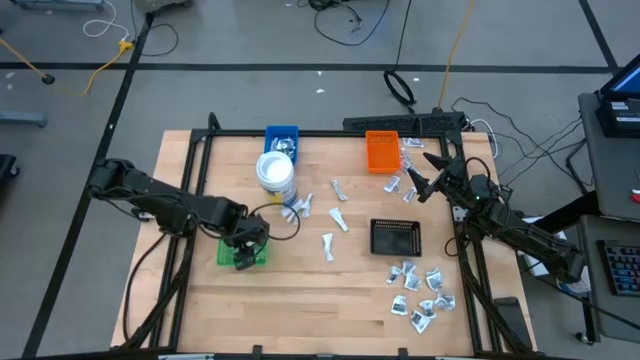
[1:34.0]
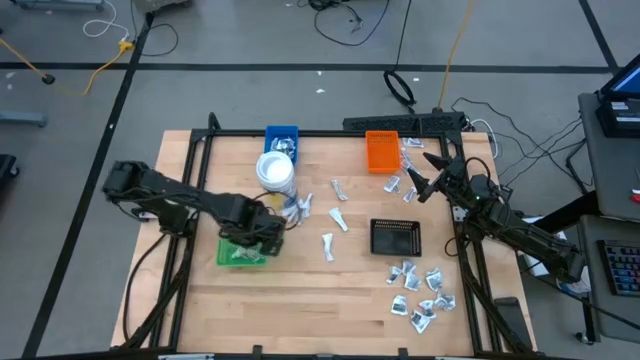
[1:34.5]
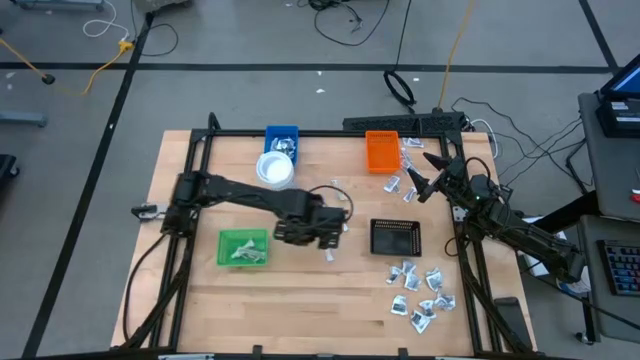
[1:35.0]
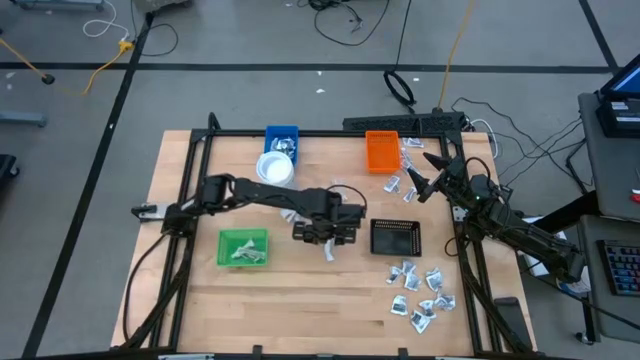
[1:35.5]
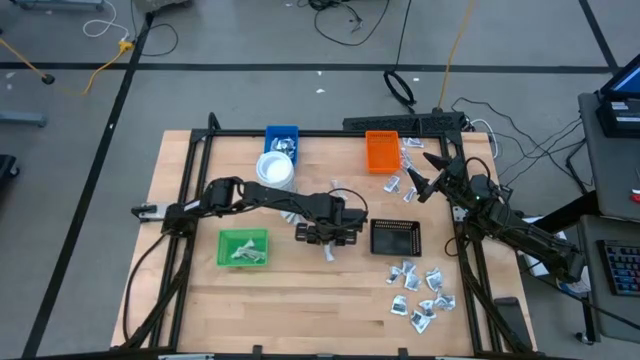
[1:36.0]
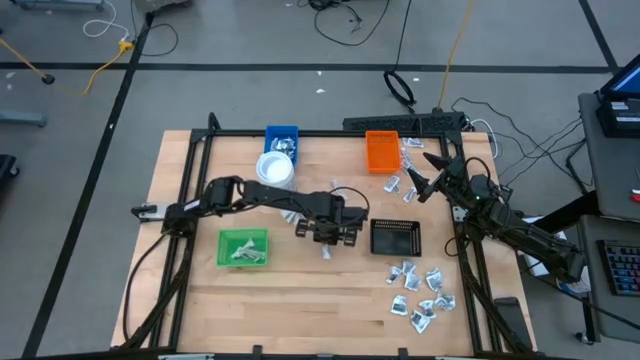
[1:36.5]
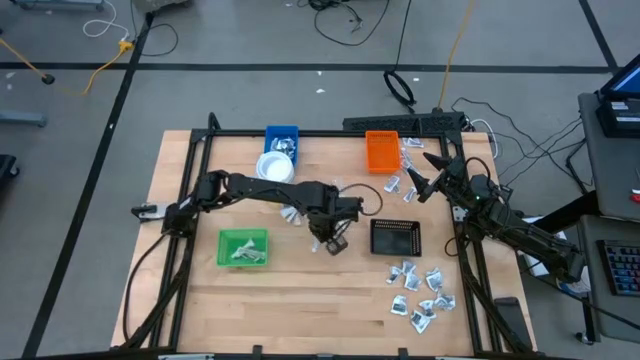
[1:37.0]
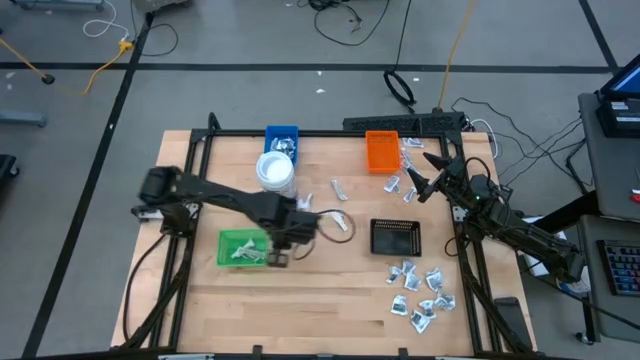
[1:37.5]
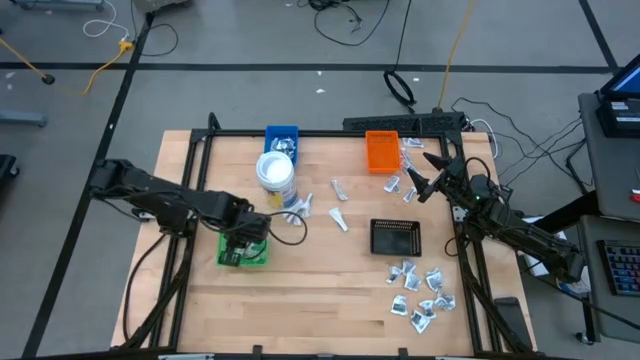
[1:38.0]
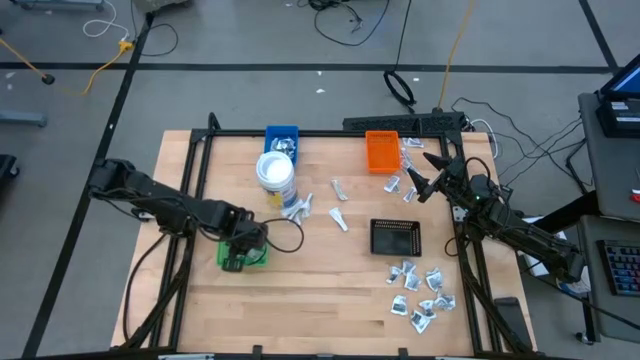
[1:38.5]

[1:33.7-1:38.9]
Task: Pick & Place First Aid Supplies
Put the green bandage pack into the green bin

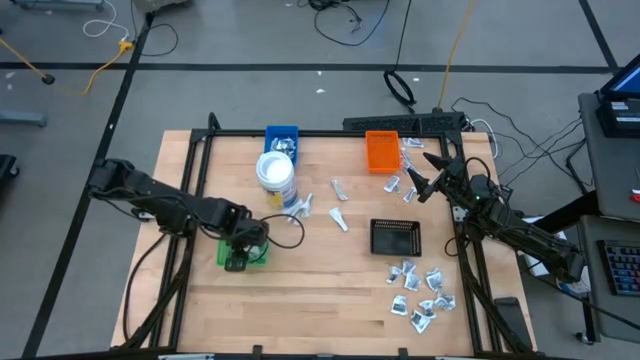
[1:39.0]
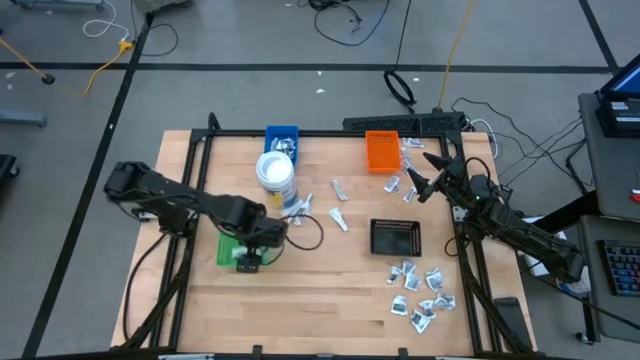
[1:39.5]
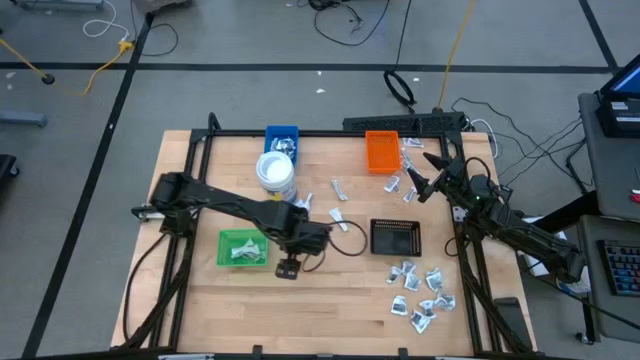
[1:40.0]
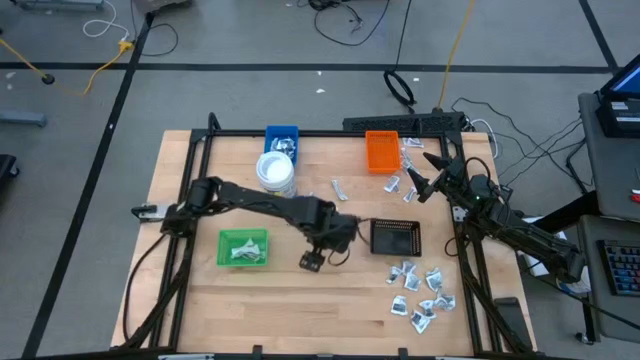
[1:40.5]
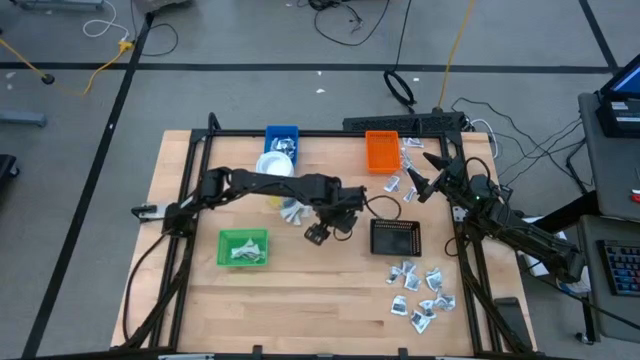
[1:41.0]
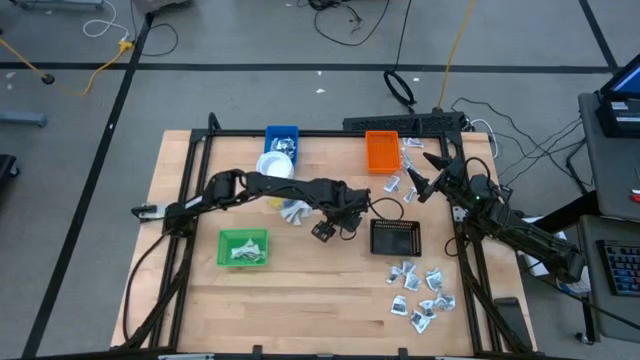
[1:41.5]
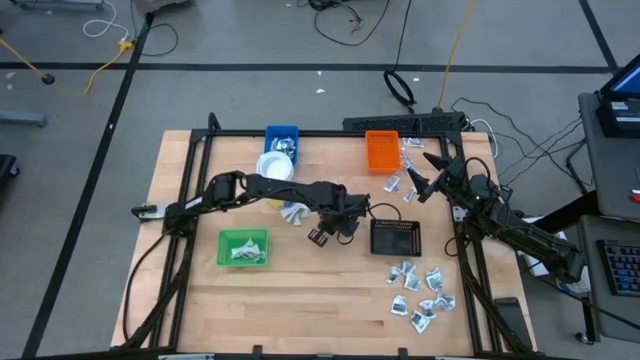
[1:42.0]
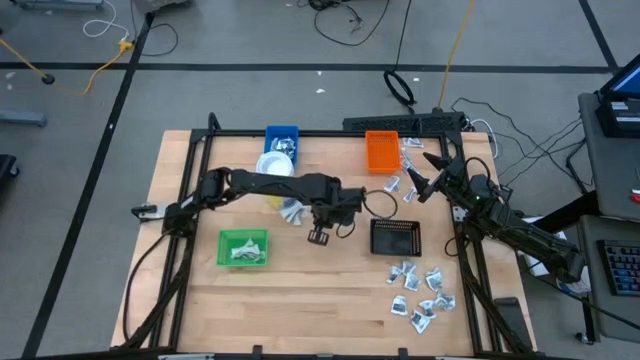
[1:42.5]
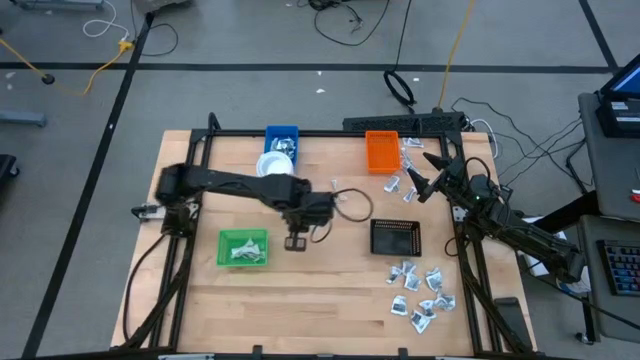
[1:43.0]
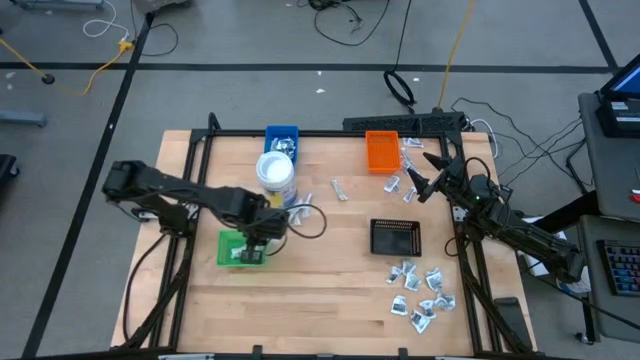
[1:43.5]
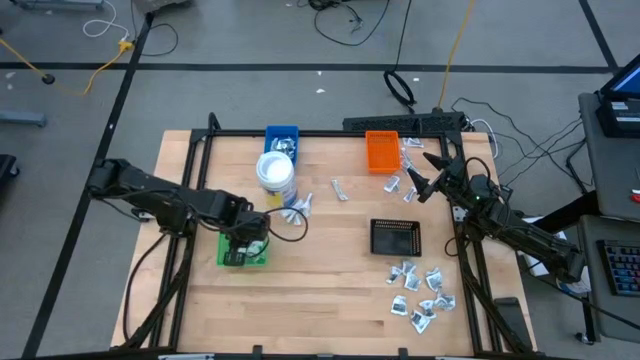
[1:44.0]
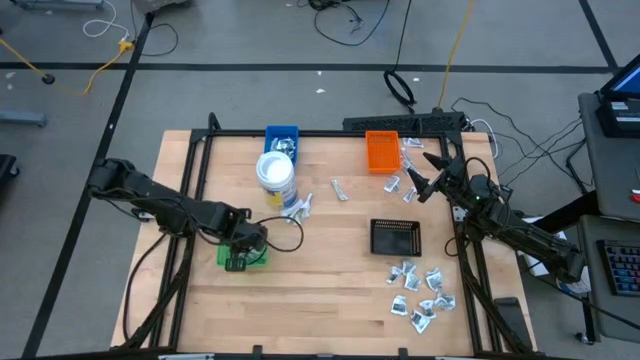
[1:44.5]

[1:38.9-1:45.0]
Put the green bandage pack into the green bin

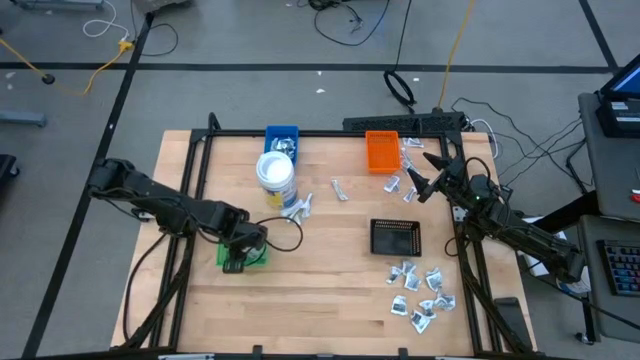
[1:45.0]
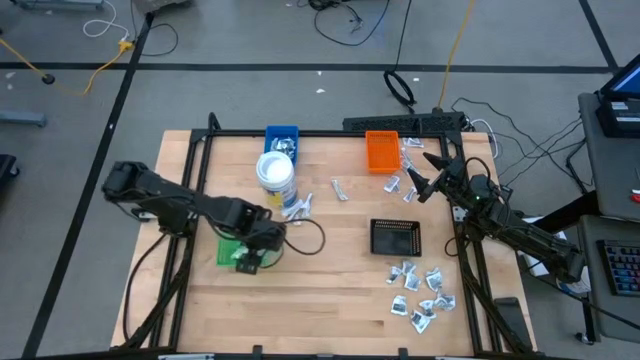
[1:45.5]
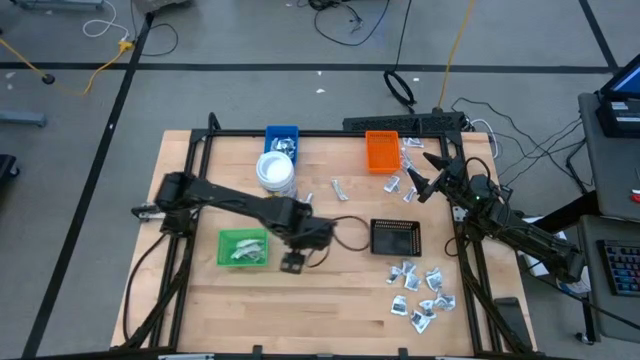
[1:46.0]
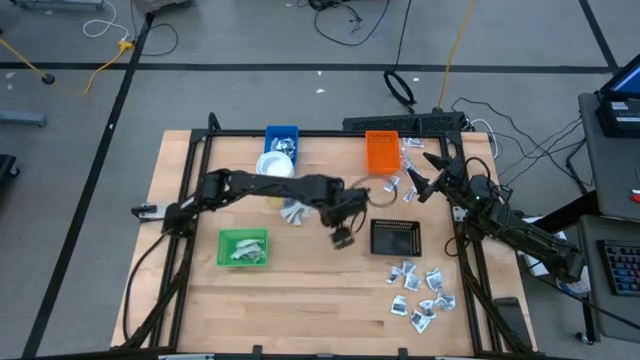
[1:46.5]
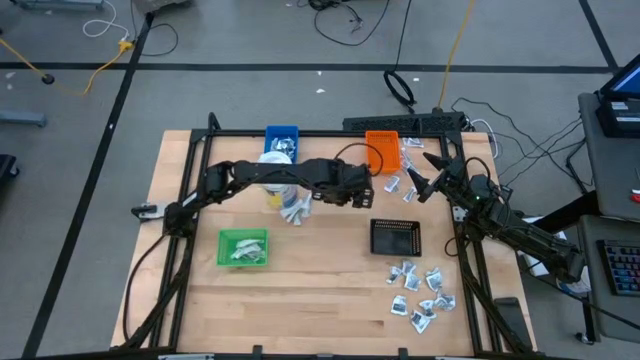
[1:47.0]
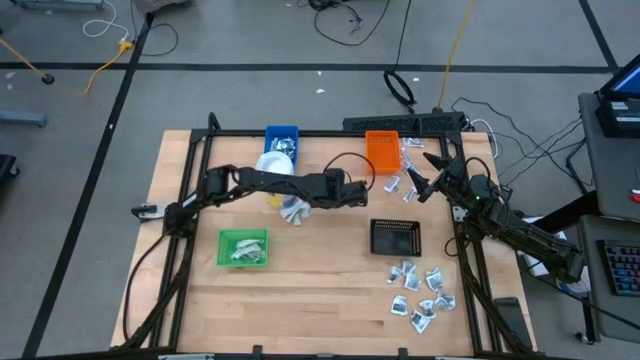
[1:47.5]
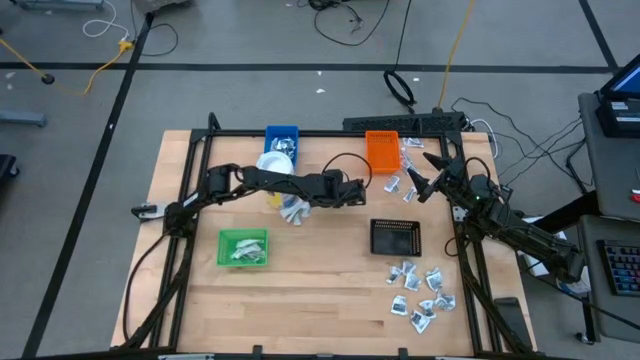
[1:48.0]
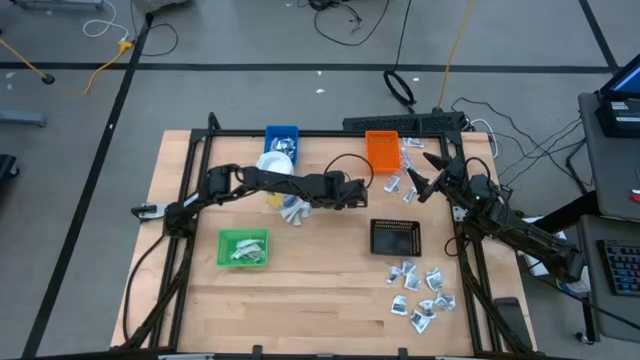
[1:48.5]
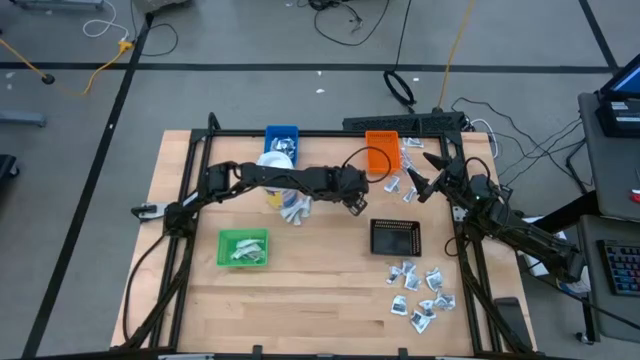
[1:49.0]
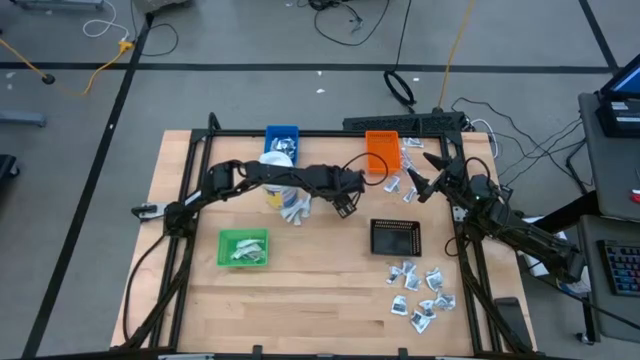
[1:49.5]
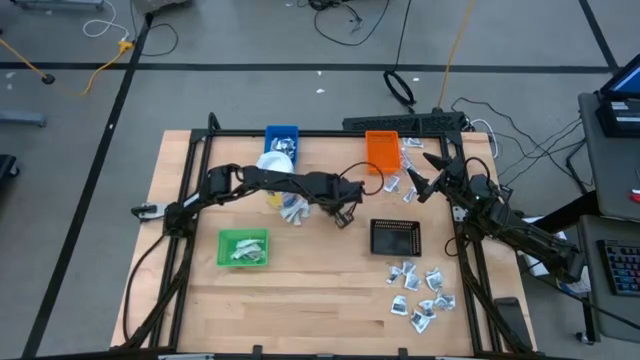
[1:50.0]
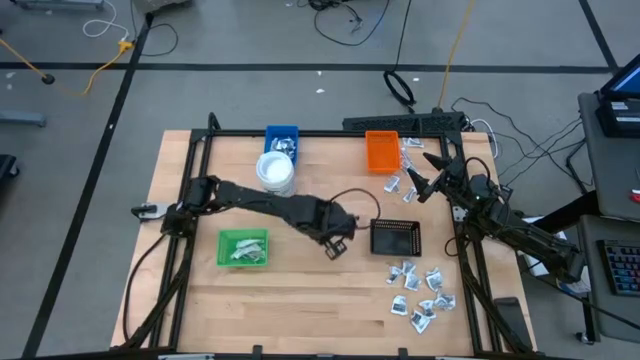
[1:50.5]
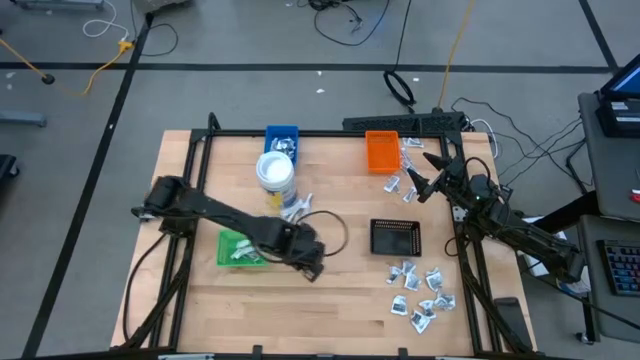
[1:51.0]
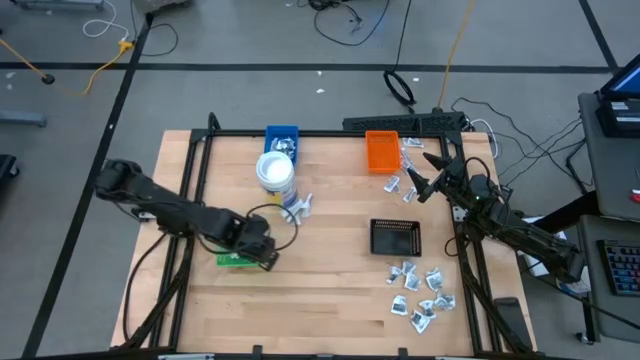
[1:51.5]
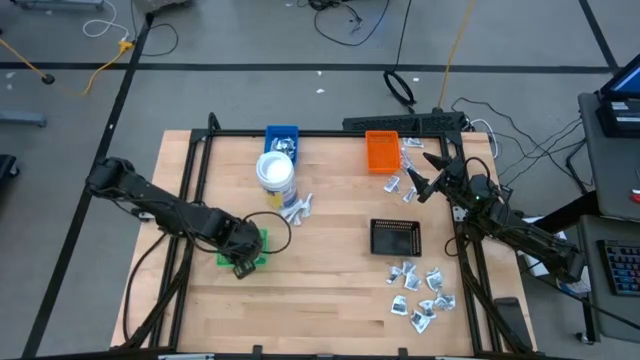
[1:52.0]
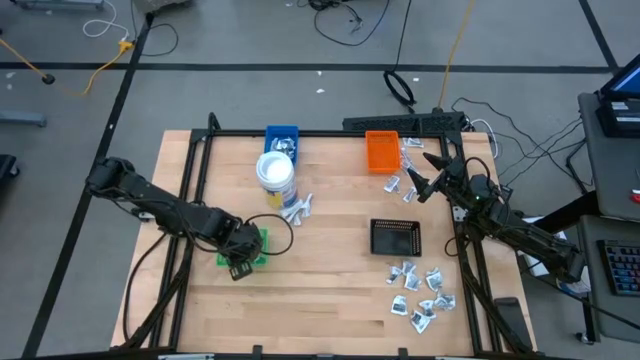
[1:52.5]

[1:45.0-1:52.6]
Put the green bandage pack into the green bin

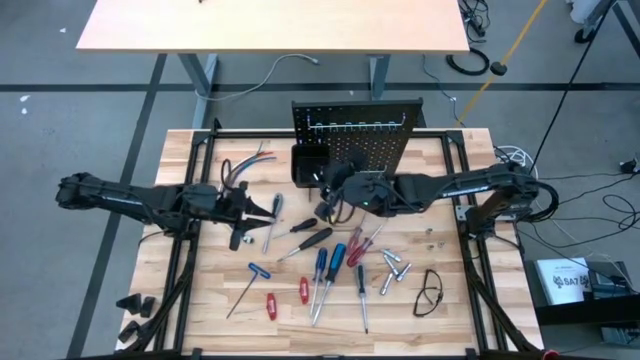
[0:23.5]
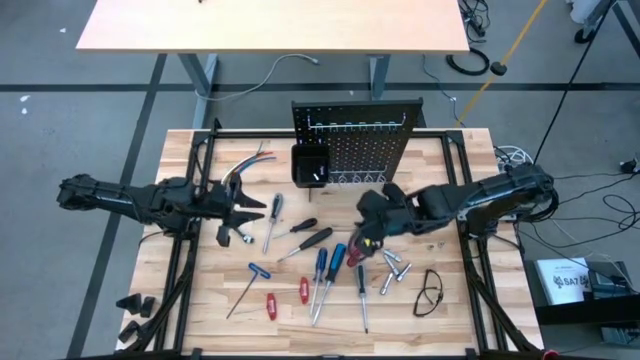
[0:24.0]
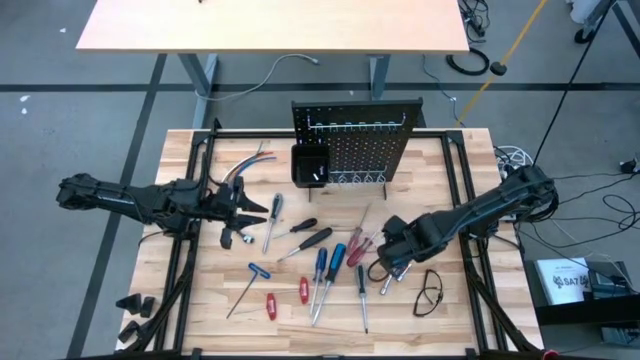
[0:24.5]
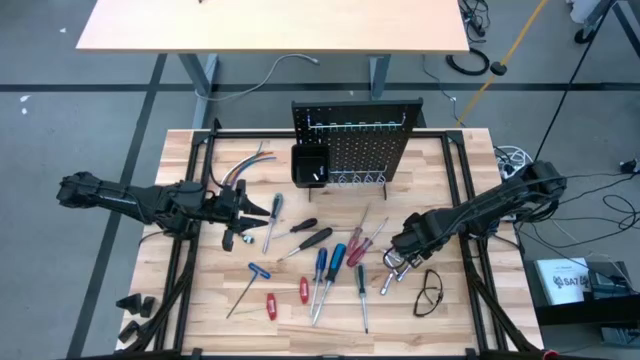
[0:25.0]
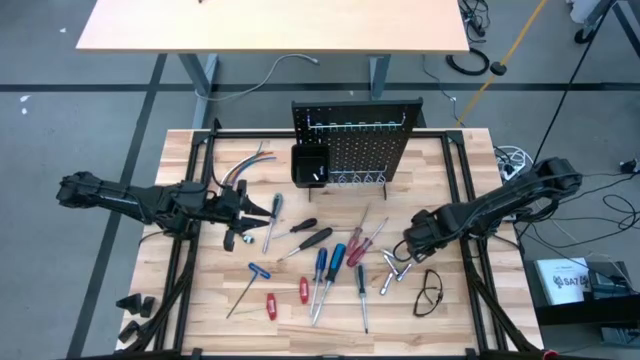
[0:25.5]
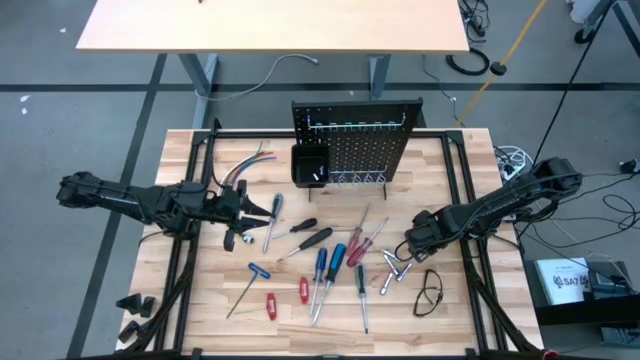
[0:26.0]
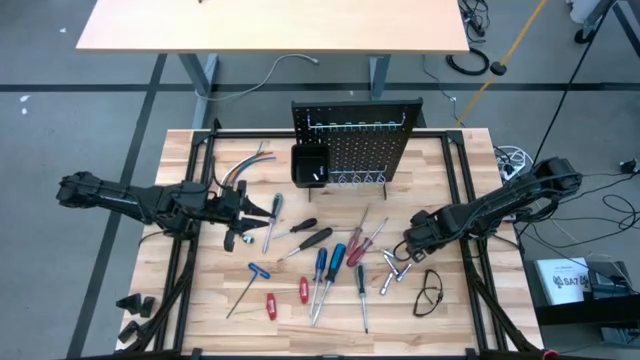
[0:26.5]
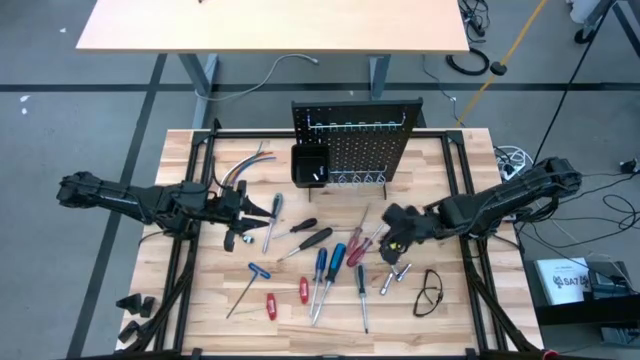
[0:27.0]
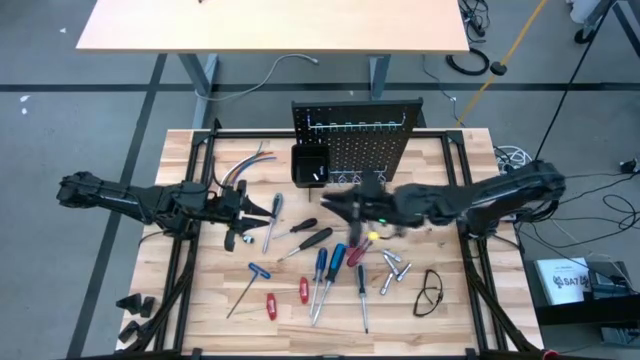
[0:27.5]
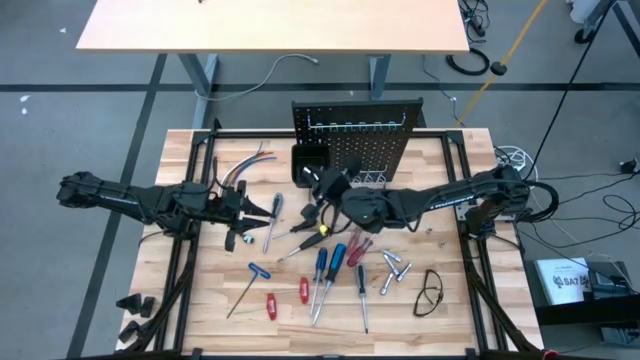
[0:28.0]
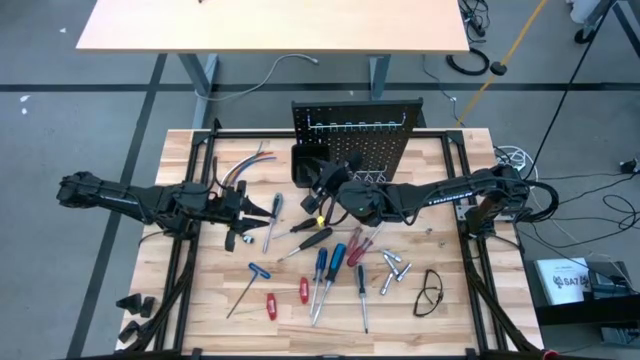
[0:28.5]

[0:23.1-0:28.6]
Task: Hang tools onto peg board
Put the socket in the black bin on the peg board
